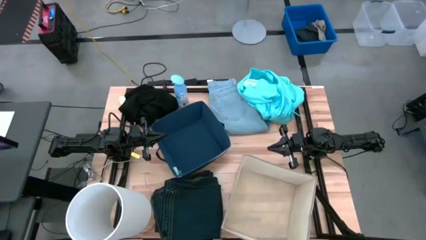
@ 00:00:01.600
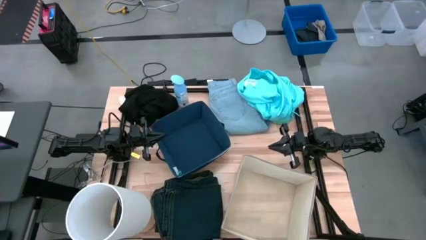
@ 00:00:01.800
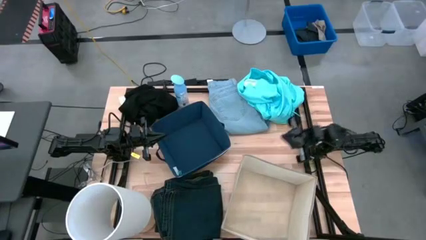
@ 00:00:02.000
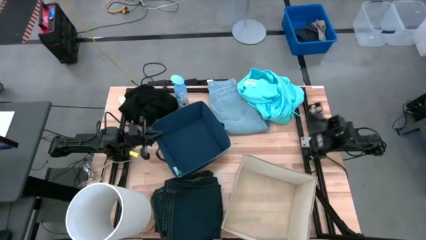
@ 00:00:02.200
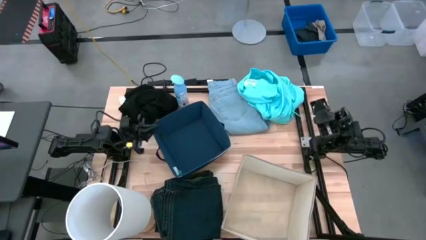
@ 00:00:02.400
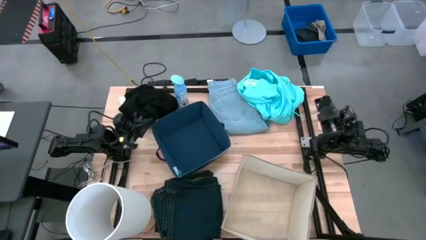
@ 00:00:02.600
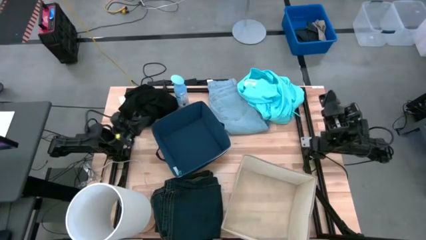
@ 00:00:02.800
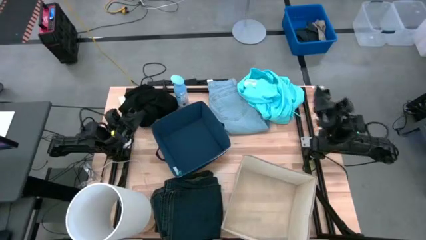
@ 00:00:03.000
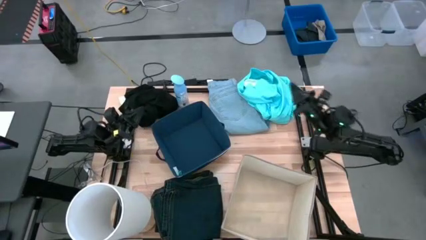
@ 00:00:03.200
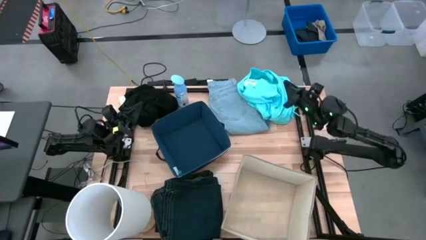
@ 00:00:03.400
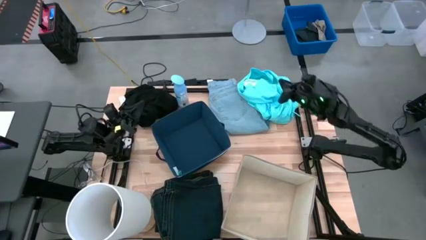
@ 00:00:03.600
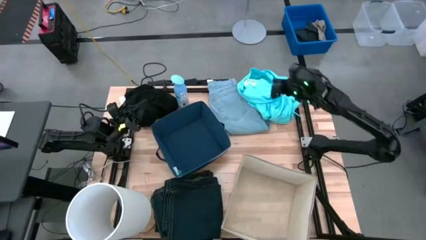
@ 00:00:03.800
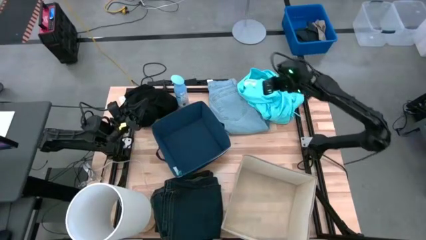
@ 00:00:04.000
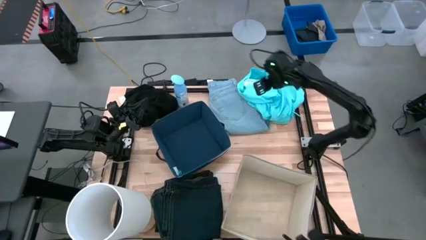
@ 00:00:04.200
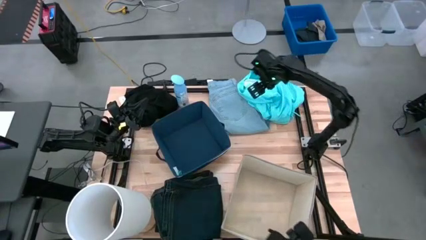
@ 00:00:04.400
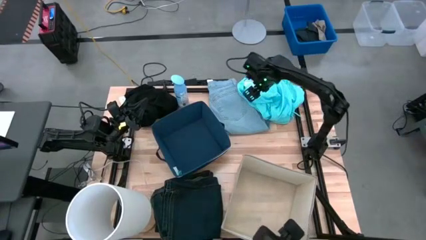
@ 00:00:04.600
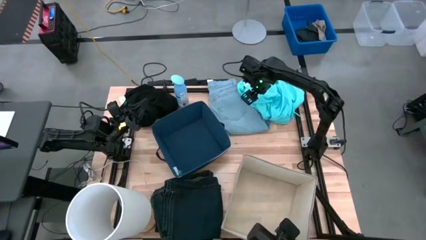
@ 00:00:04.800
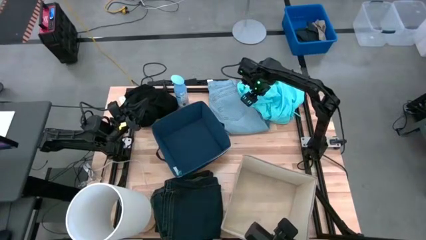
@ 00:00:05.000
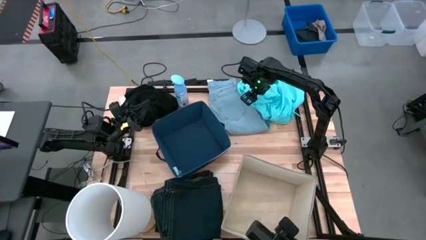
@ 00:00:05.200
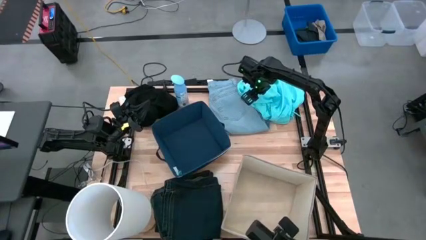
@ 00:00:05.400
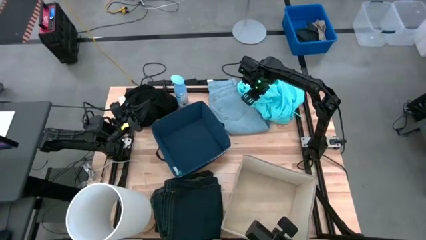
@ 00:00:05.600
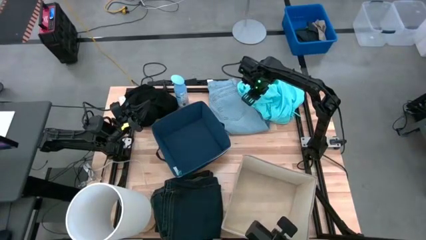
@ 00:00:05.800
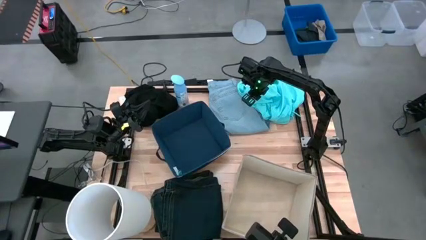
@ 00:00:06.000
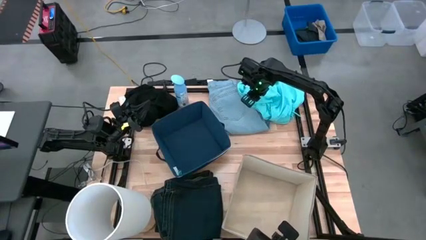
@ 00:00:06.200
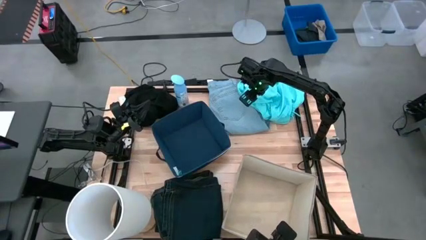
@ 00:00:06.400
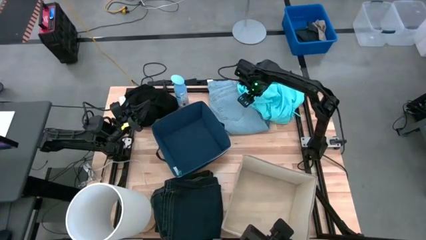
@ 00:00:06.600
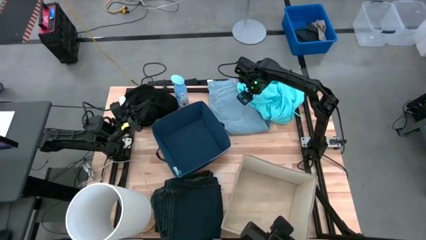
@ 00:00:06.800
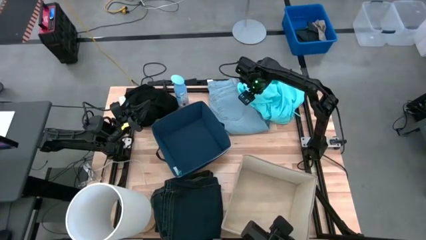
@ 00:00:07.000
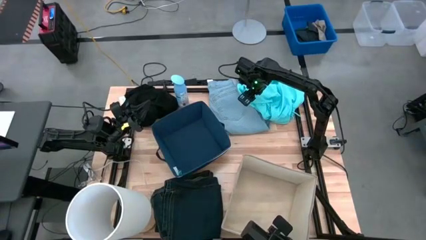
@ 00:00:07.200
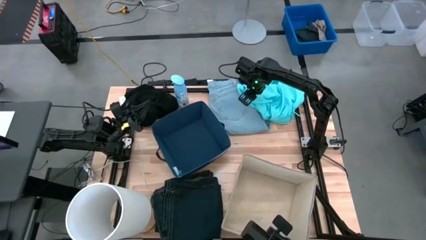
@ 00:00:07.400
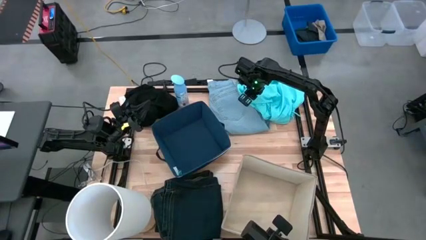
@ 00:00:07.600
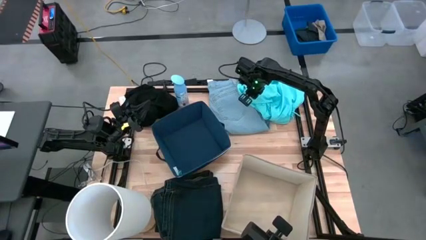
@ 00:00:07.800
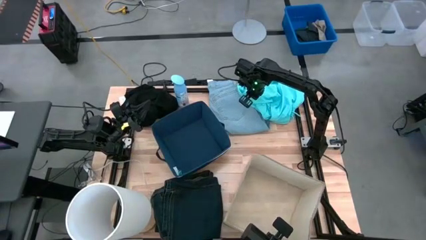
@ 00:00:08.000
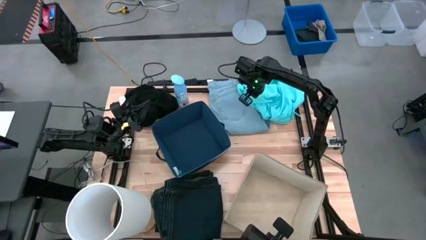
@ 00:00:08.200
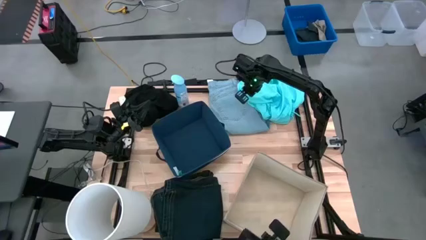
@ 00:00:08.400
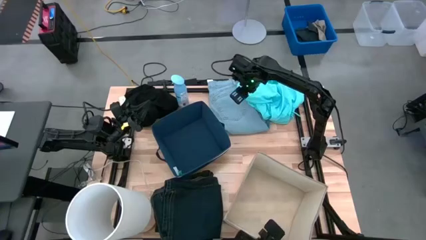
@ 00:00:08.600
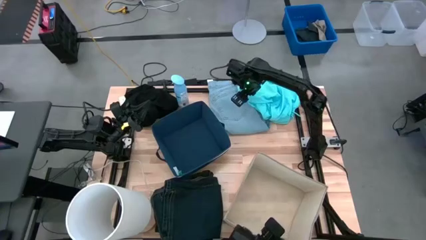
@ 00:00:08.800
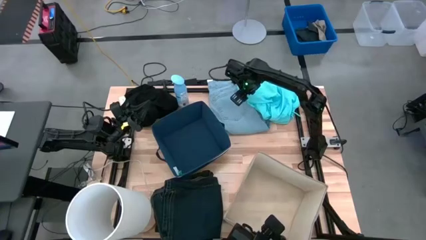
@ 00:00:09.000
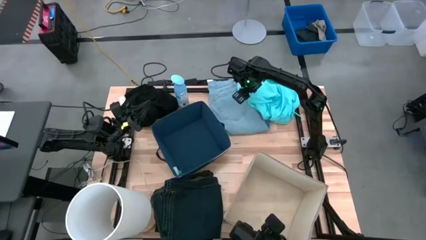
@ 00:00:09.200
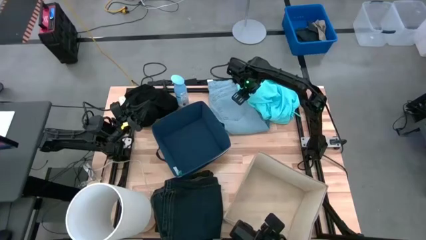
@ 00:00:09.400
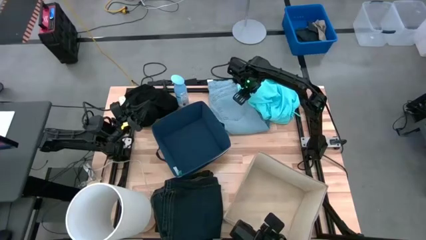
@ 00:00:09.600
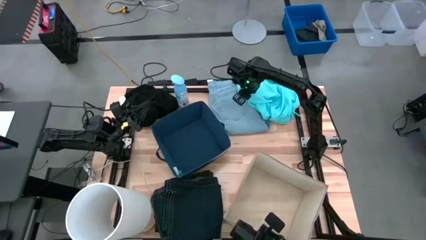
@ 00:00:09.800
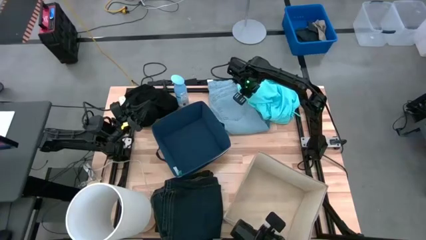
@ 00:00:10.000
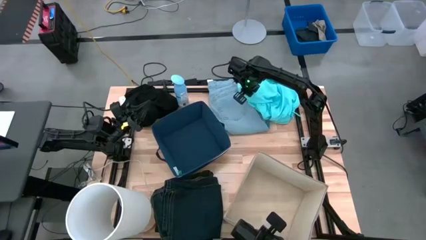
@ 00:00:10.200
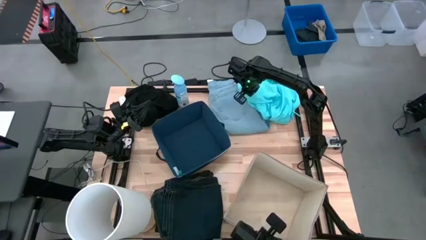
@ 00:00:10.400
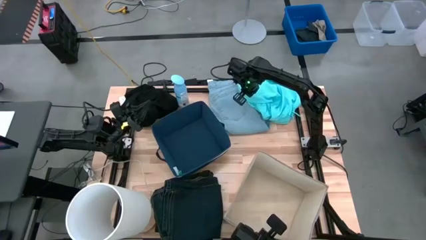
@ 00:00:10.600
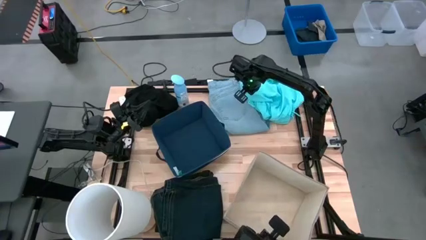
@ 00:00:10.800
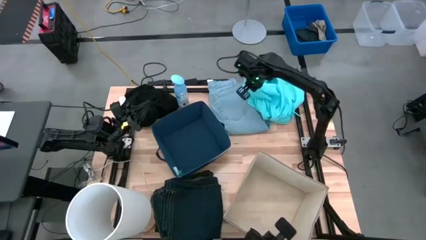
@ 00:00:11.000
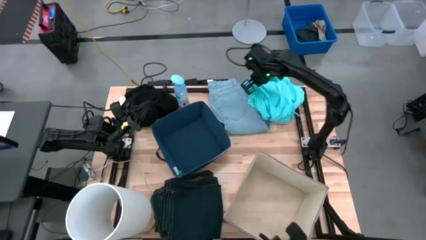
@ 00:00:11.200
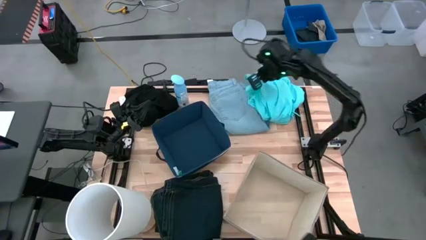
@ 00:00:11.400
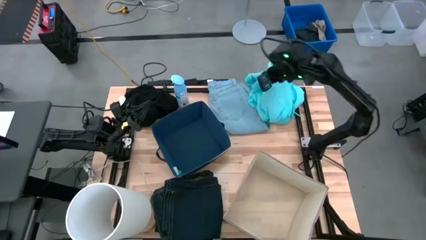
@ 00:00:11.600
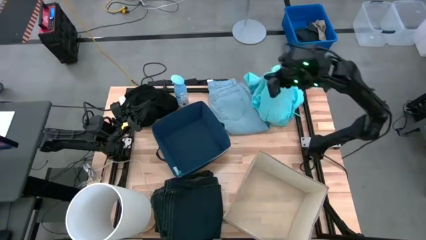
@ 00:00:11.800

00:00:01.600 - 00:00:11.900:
Task: Sort clothes
Put the light blue shorts into the brown laundry organizer

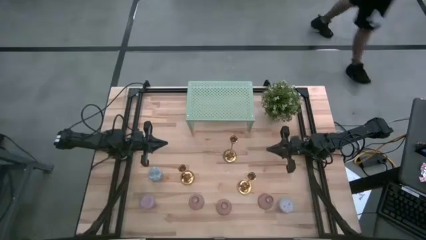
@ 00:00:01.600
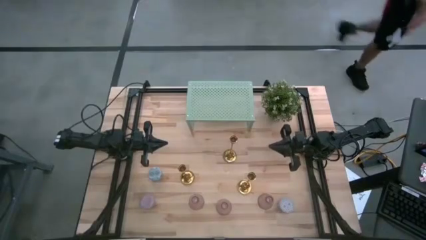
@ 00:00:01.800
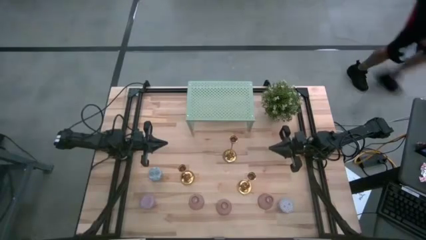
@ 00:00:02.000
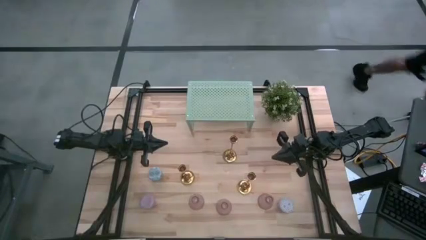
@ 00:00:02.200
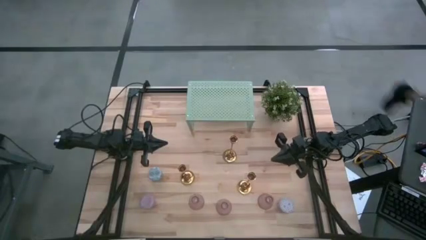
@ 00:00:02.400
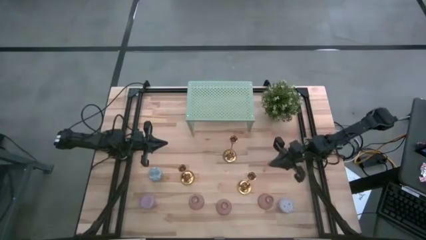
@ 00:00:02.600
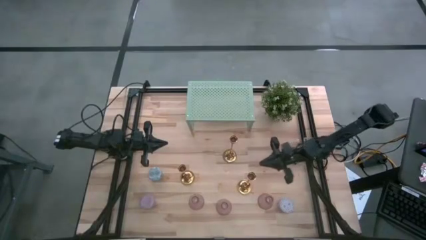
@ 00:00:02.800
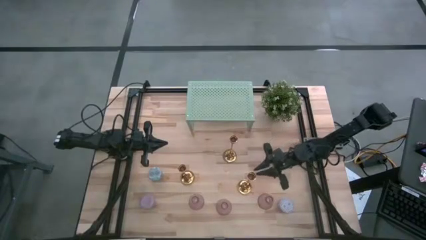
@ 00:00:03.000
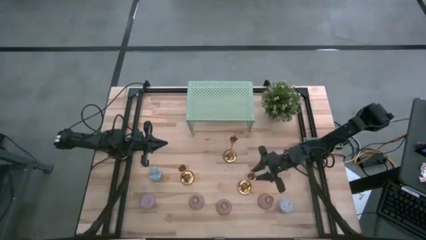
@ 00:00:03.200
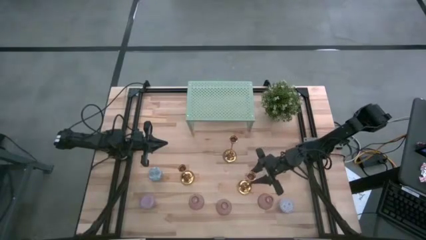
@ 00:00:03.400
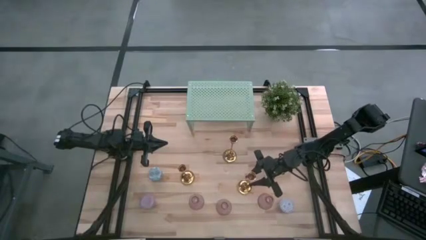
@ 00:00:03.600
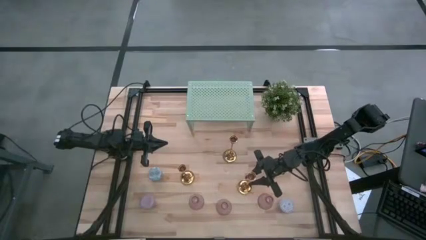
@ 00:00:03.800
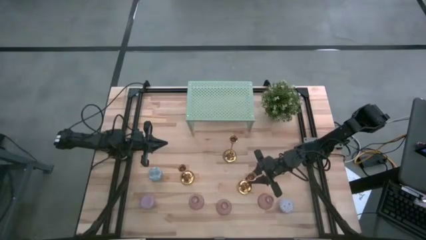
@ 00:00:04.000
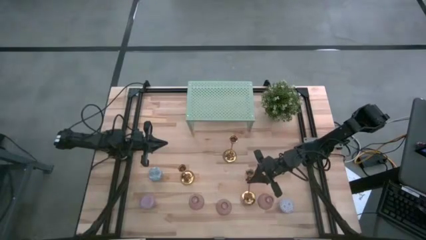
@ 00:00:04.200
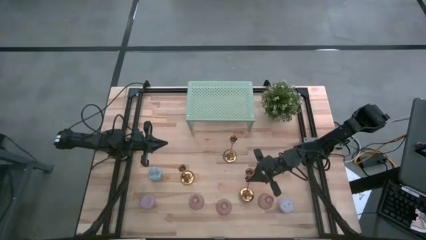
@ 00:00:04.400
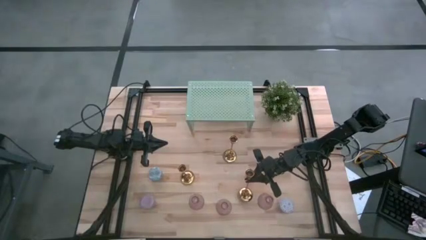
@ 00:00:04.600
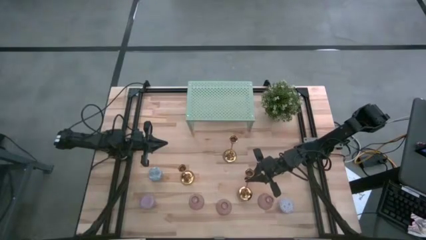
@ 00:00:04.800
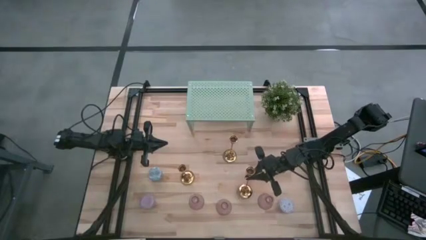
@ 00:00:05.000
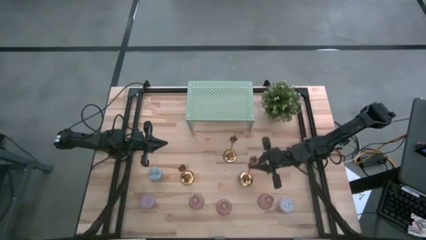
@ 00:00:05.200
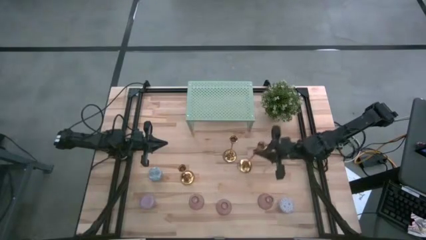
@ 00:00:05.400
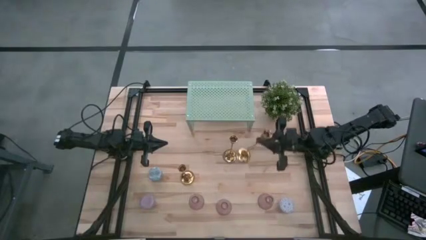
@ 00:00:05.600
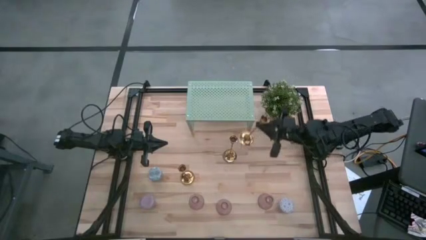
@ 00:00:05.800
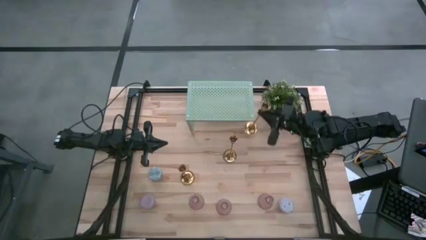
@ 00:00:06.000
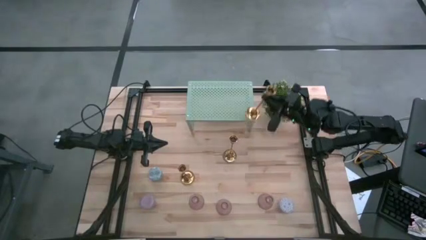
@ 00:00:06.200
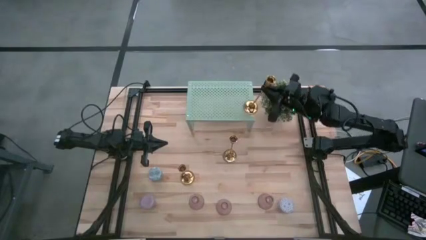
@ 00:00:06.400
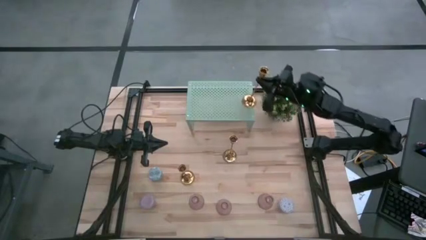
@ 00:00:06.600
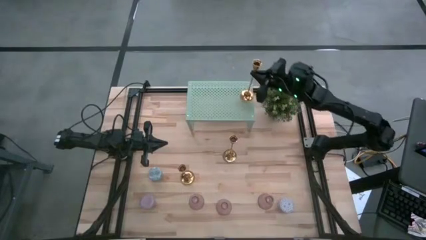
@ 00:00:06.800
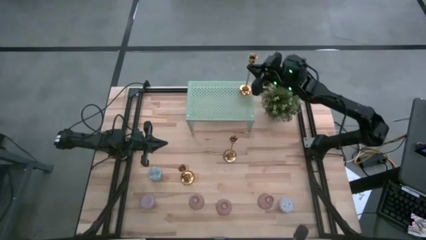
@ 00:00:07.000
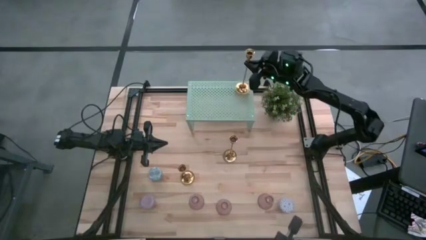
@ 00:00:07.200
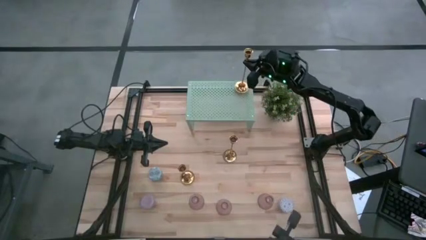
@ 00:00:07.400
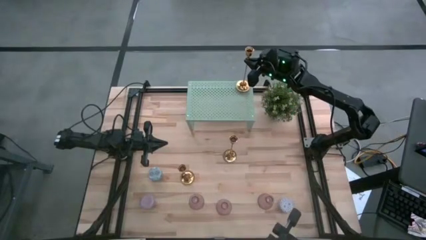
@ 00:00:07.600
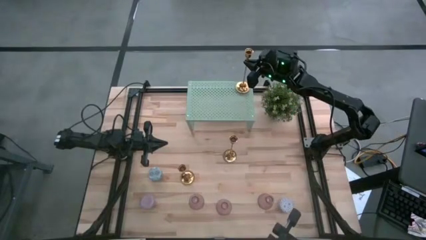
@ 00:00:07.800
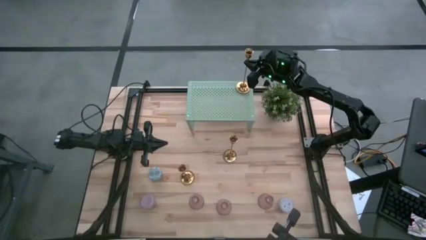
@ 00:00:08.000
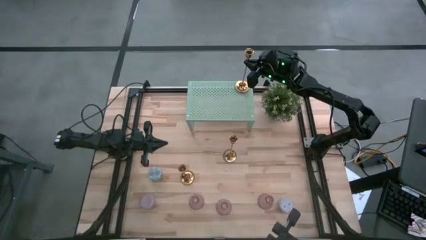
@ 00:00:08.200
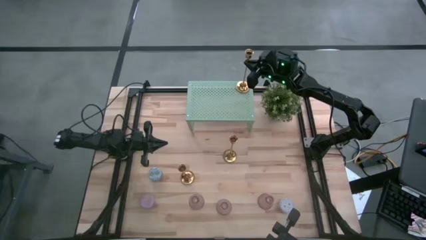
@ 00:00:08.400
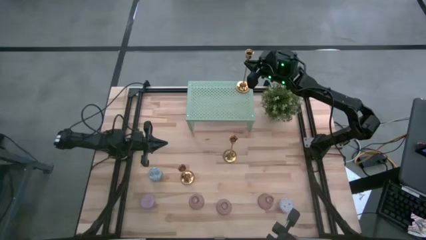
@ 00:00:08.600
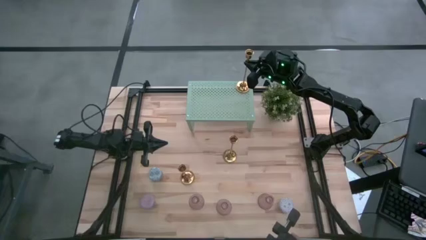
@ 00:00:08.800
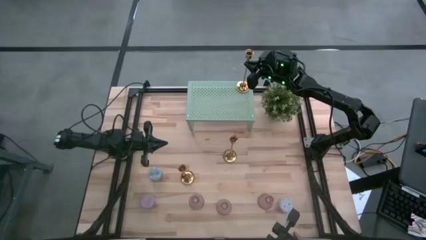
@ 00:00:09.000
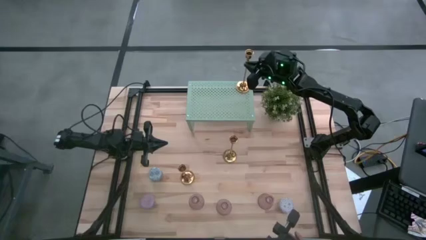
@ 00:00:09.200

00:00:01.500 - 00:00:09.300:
Task: Pick & Place candle stick holders
Put the bottom gold candle holder on the shelf
